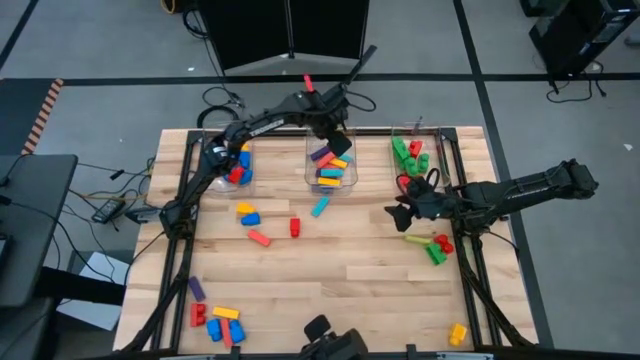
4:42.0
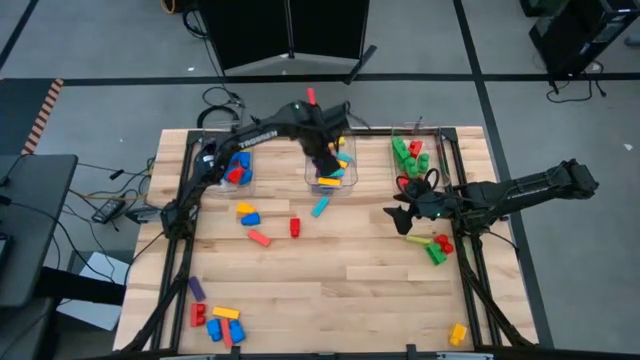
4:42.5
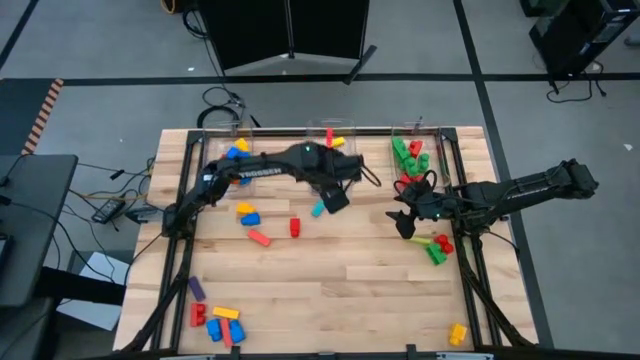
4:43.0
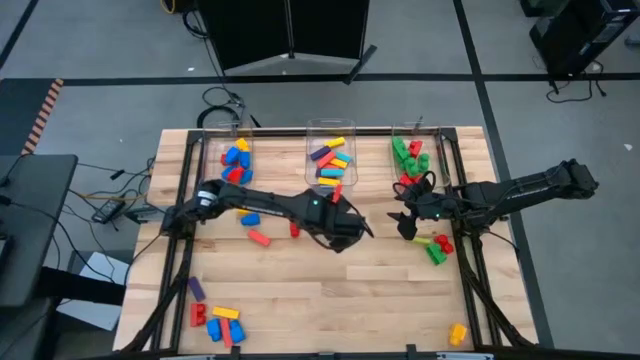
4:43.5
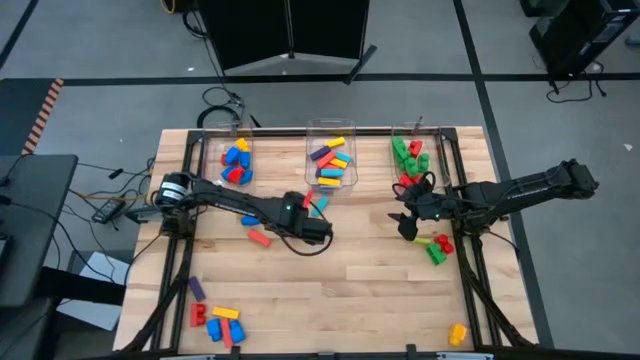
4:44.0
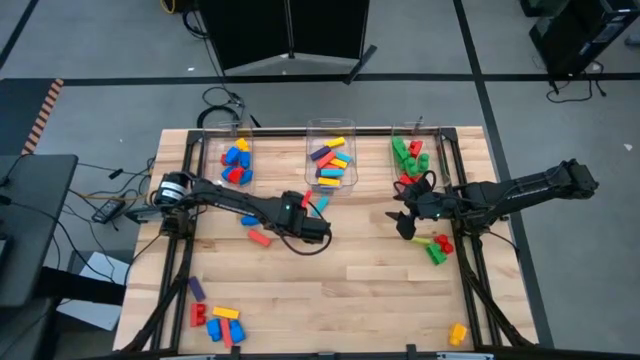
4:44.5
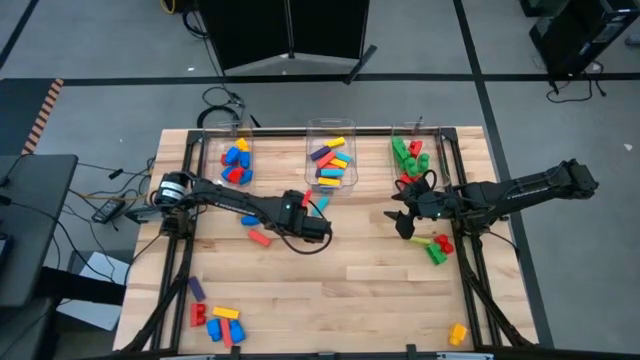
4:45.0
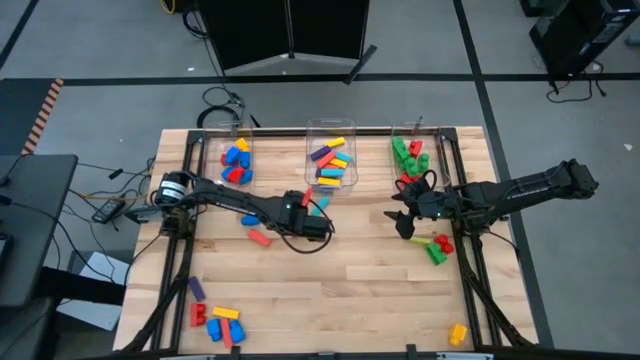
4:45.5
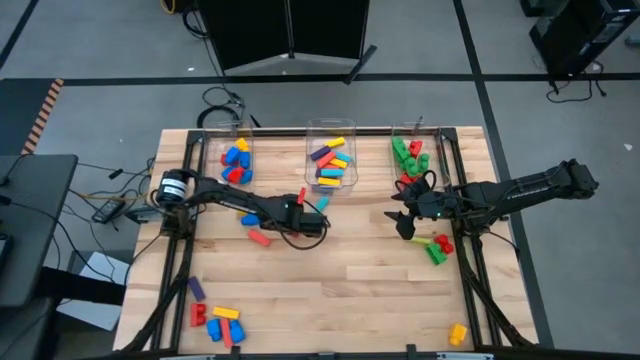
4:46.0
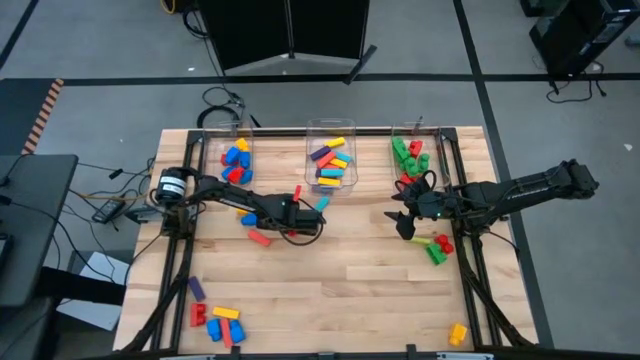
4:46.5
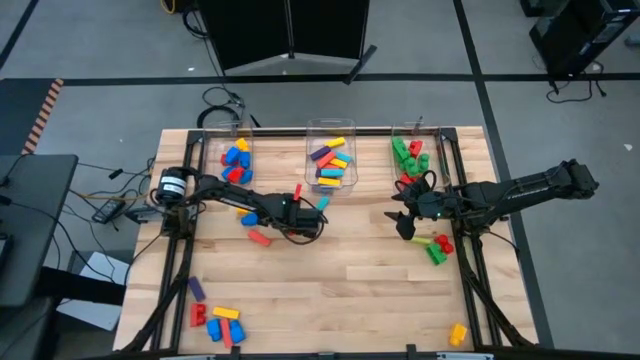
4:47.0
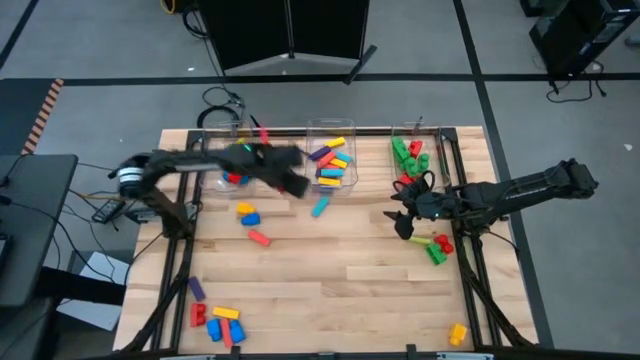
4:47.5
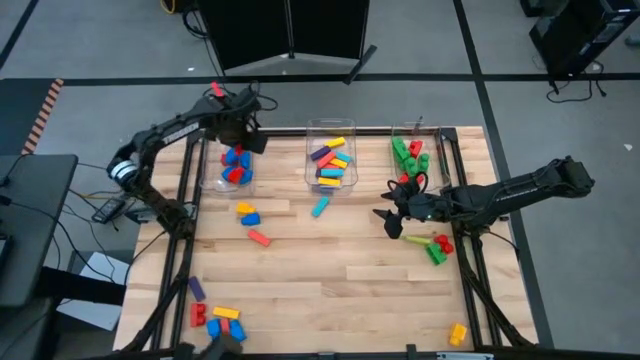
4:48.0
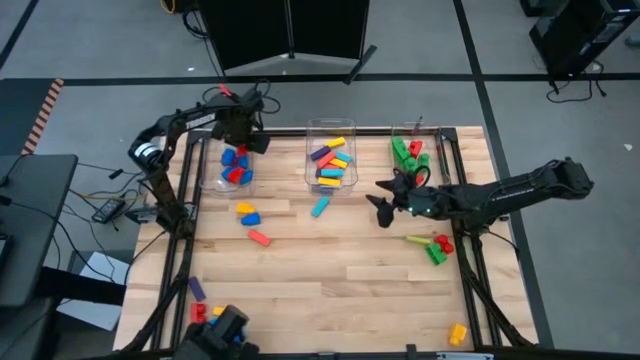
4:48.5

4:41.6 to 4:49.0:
Task: Sort blocks by size
Put the red 1 stud game piece into the left transparent bin

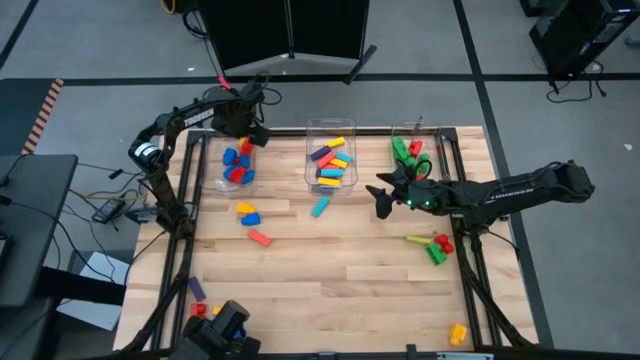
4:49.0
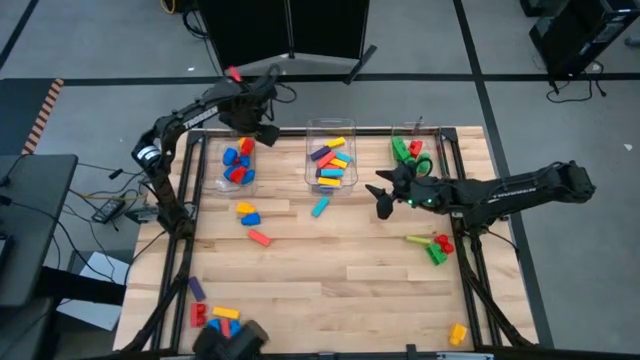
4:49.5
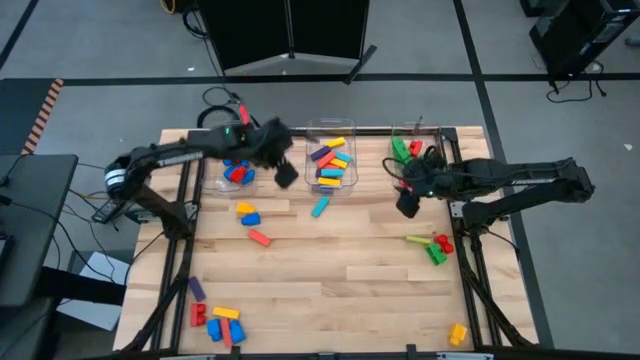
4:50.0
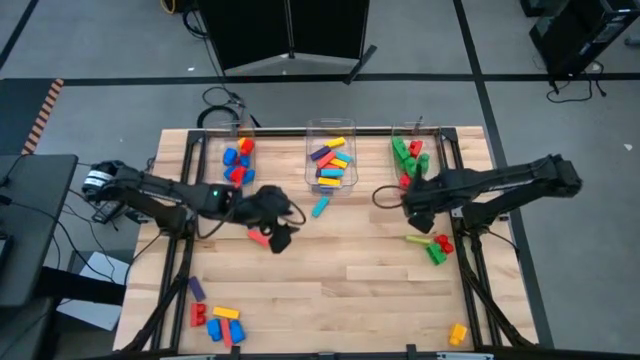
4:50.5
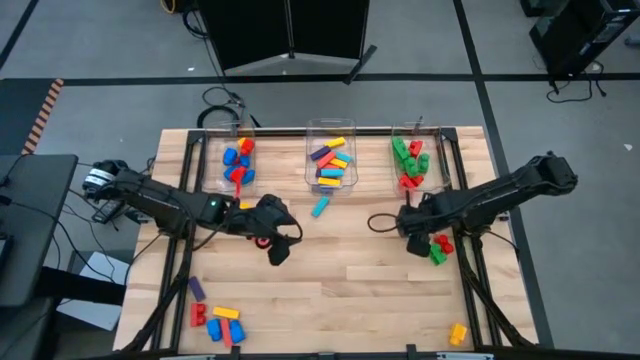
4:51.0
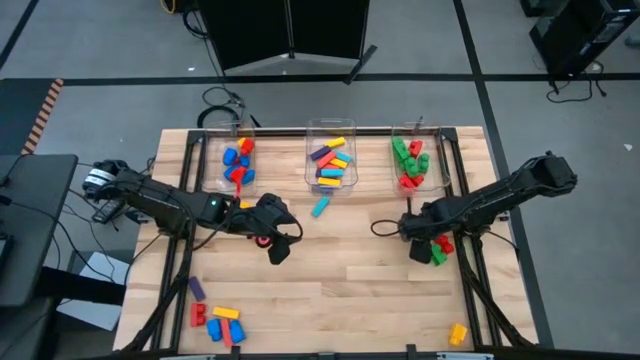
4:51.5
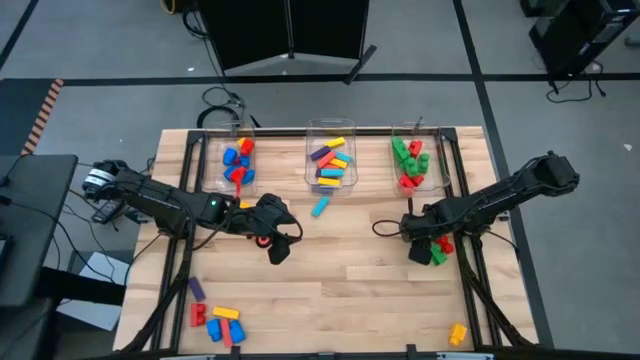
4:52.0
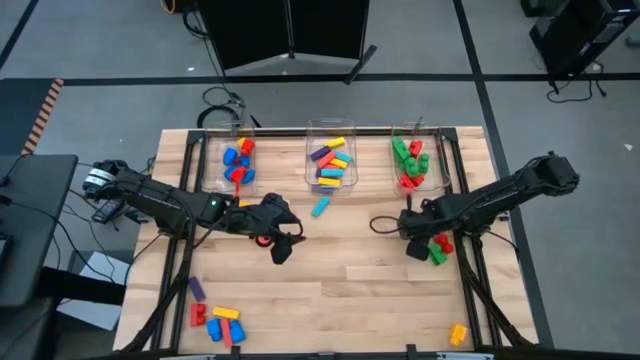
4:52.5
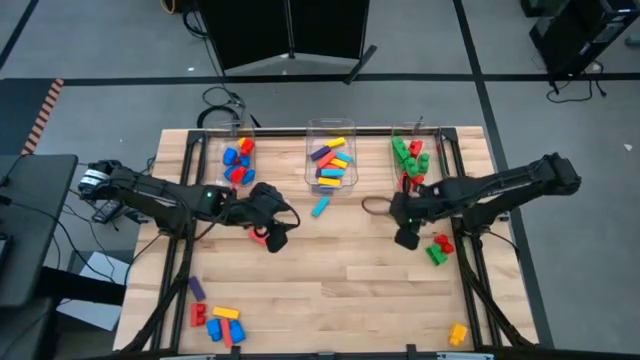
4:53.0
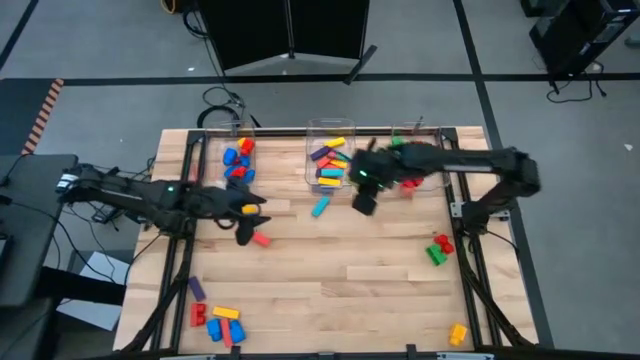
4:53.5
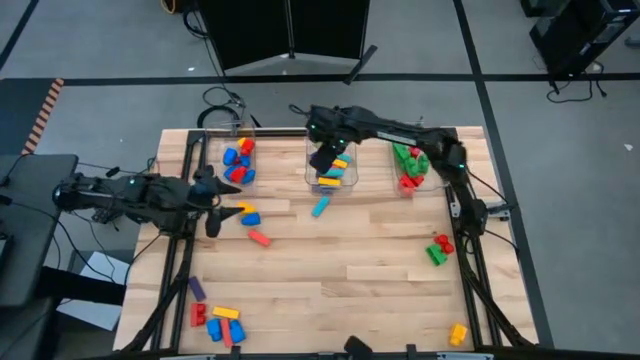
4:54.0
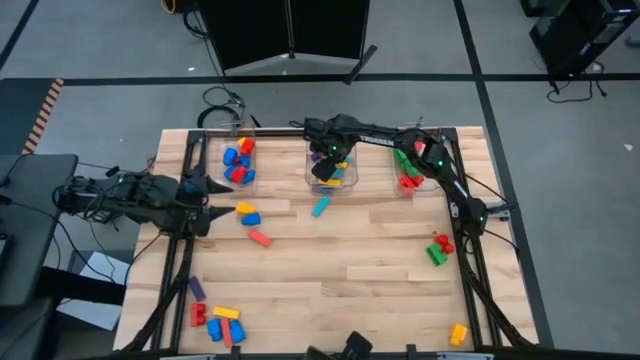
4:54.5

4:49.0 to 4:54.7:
Put the green block into the middle transparent bin

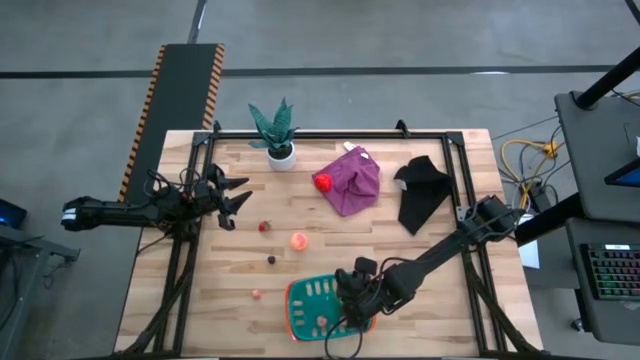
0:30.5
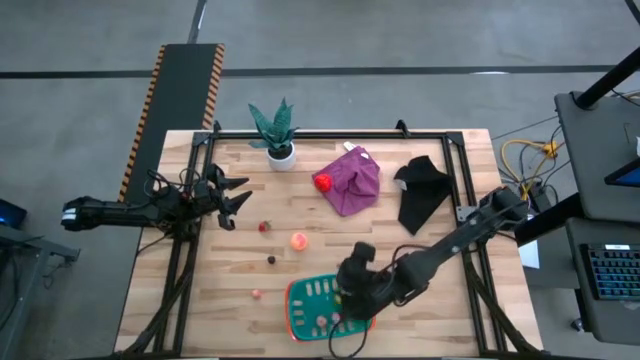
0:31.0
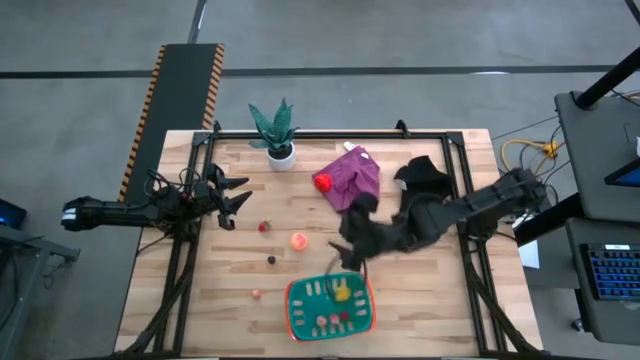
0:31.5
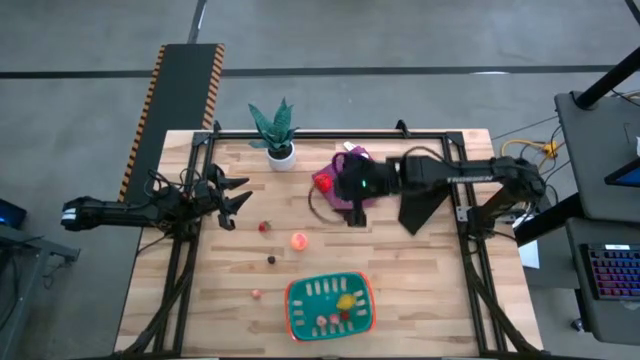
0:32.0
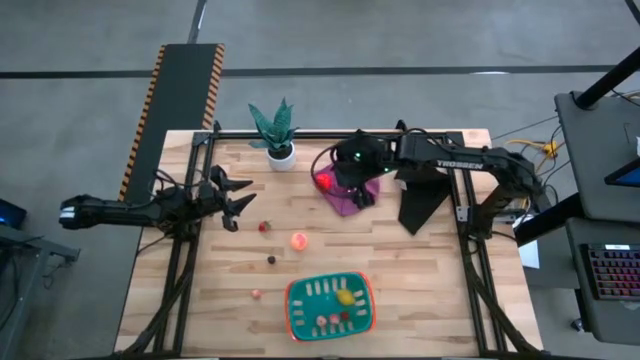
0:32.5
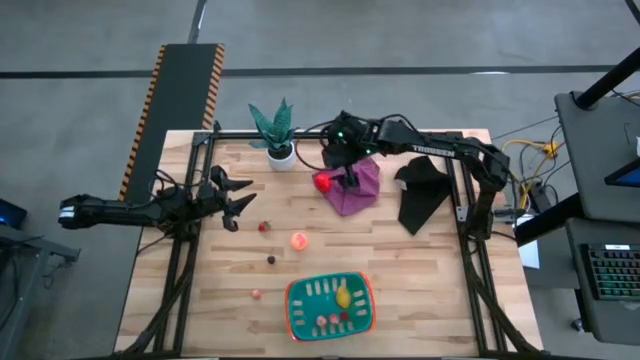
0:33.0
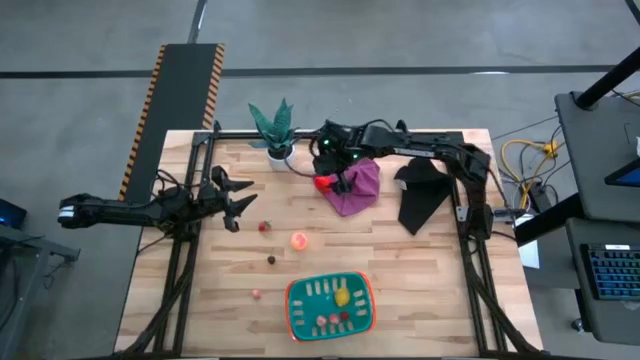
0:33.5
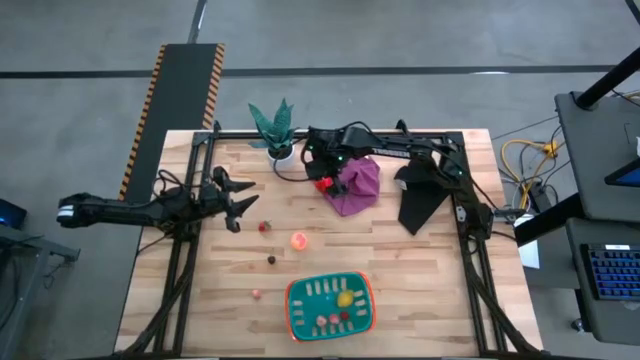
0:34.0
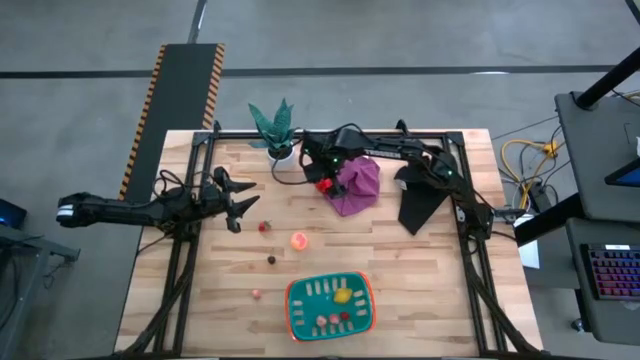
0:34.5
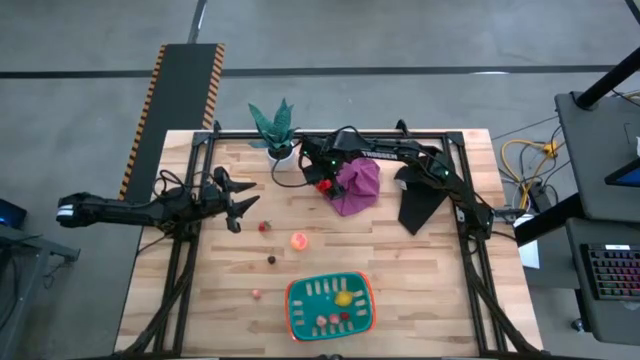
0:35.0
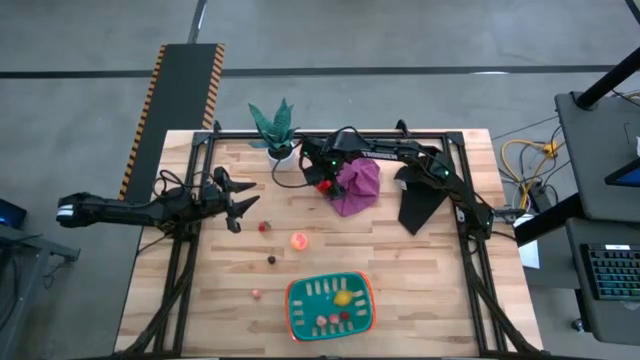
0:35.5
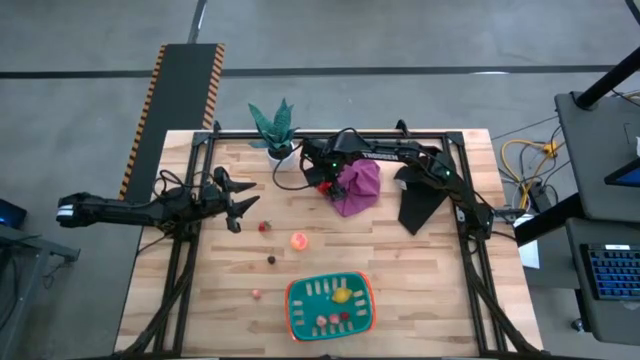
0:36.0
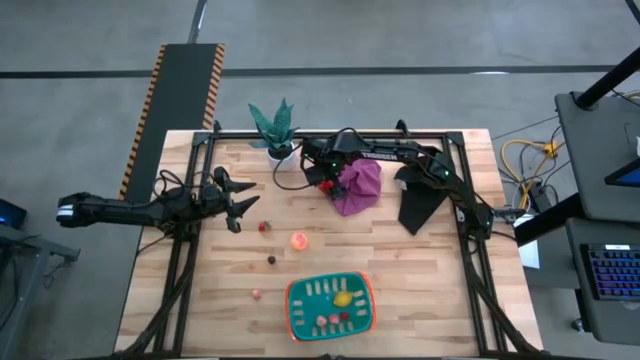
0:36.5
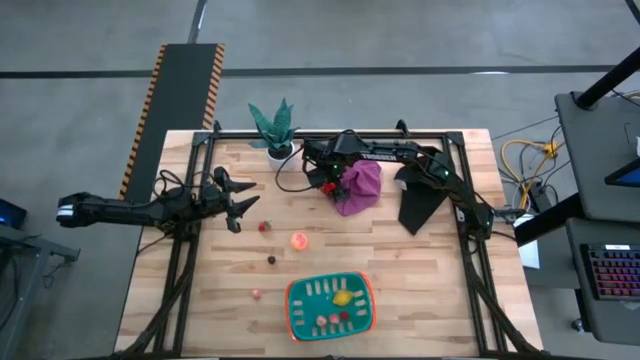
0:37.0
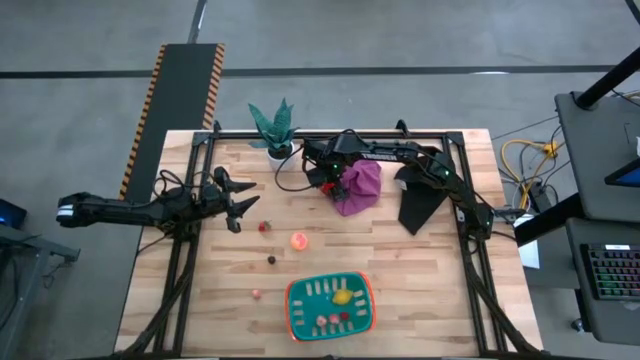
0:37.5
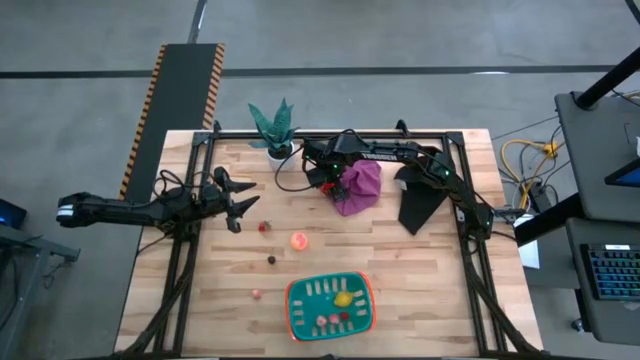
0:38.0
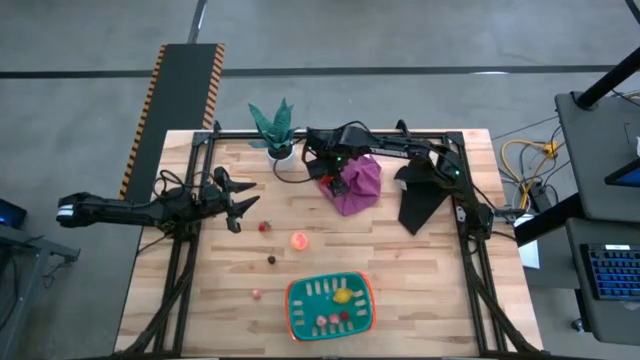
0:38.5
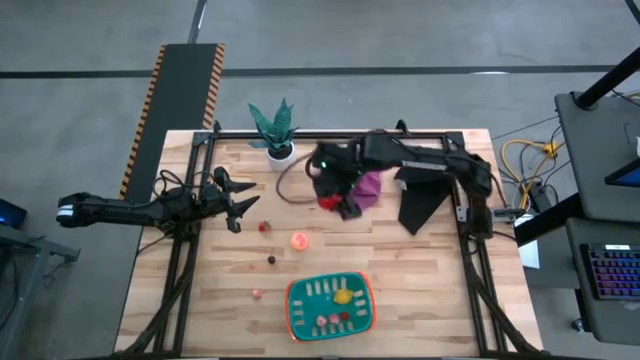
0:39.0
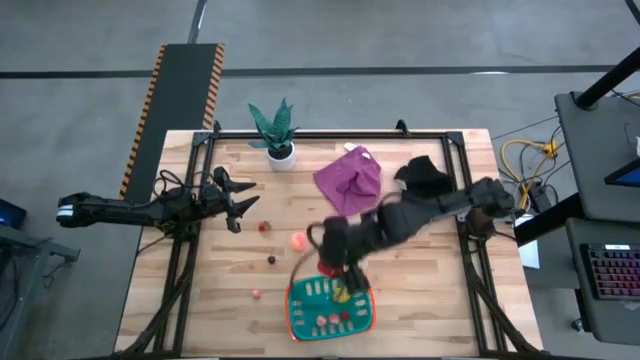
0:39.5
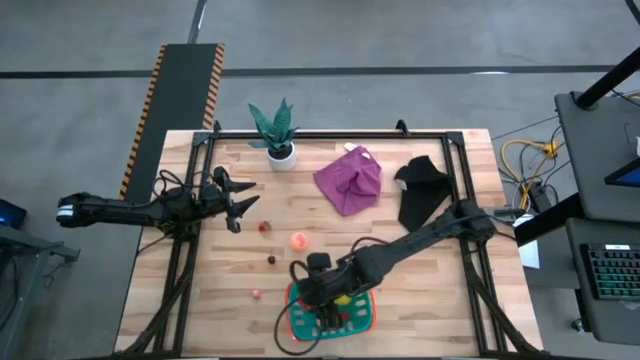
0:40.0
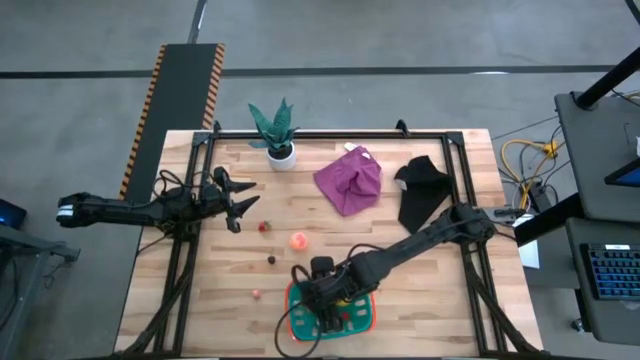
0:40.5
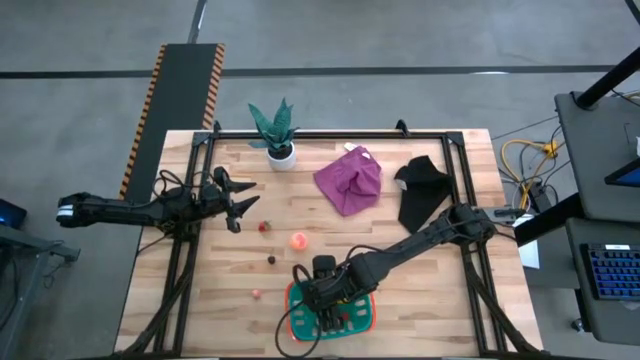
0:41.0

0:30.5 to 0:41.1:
Task: Pick and placing Produce into tupperware
Put the red apple into the green basket
